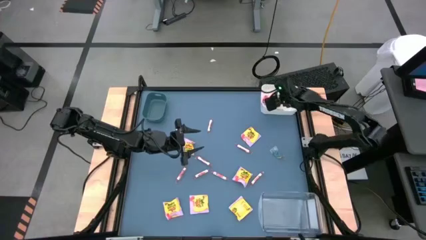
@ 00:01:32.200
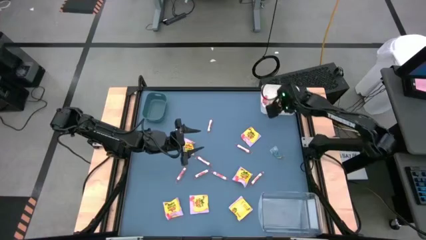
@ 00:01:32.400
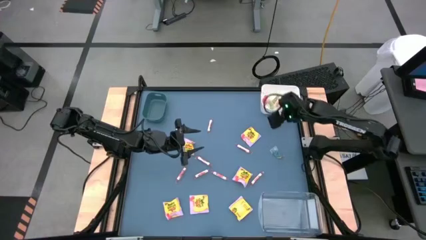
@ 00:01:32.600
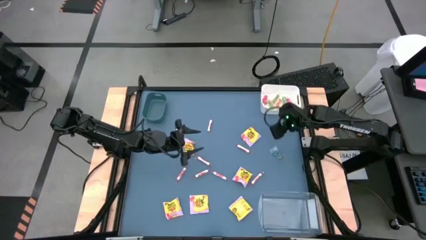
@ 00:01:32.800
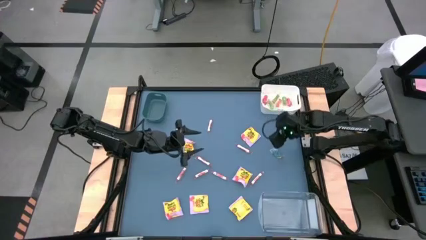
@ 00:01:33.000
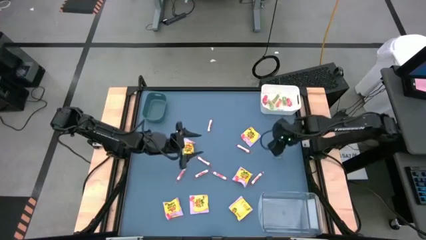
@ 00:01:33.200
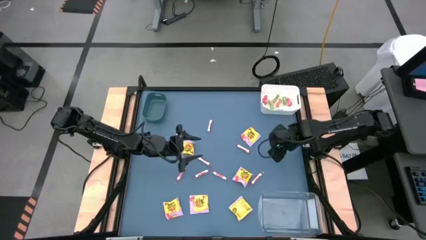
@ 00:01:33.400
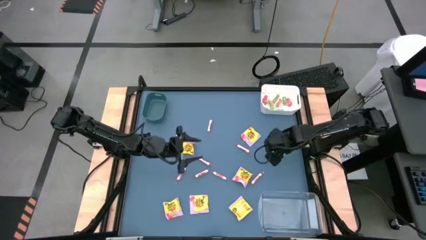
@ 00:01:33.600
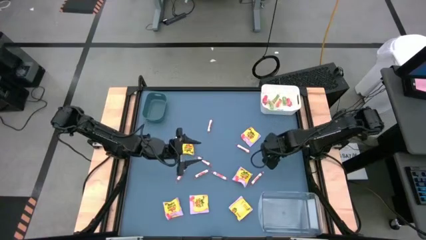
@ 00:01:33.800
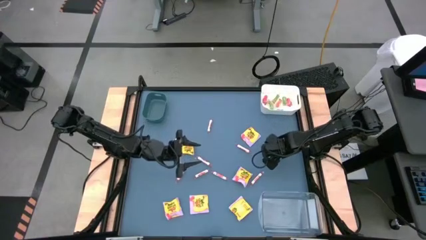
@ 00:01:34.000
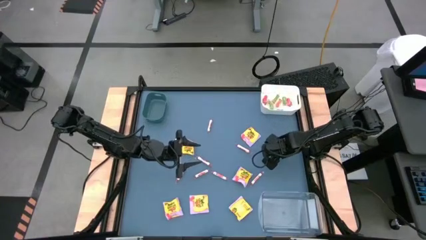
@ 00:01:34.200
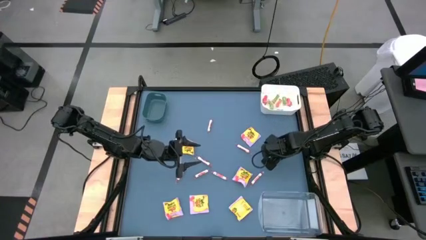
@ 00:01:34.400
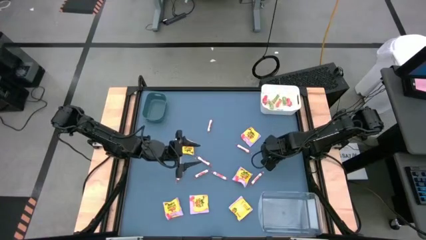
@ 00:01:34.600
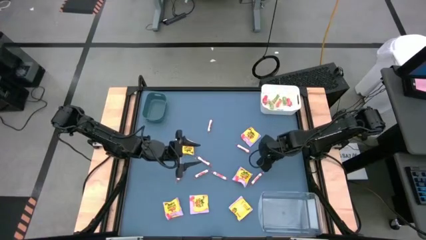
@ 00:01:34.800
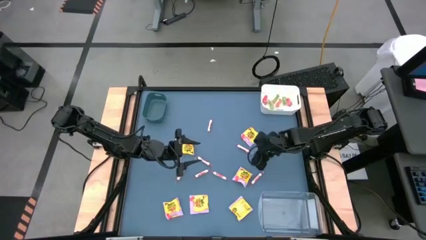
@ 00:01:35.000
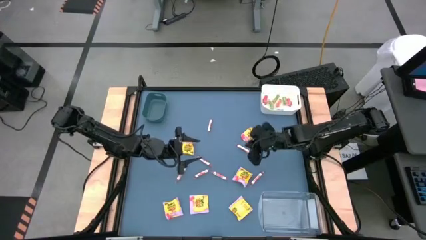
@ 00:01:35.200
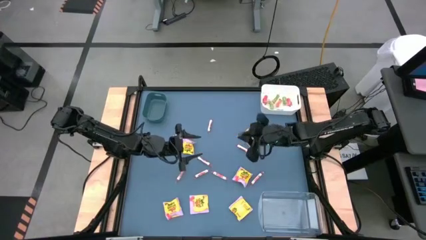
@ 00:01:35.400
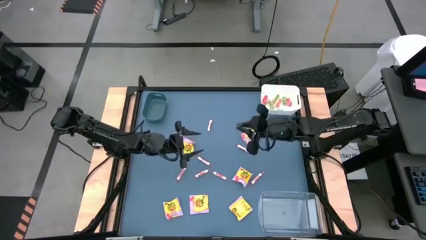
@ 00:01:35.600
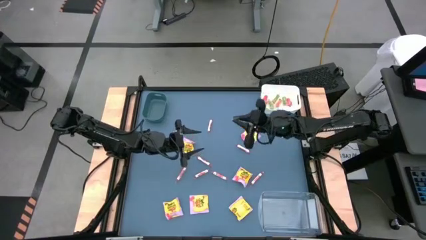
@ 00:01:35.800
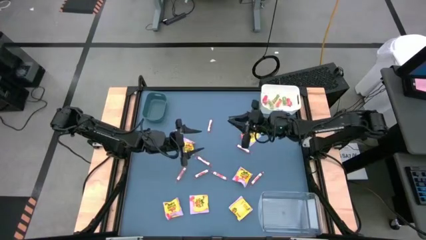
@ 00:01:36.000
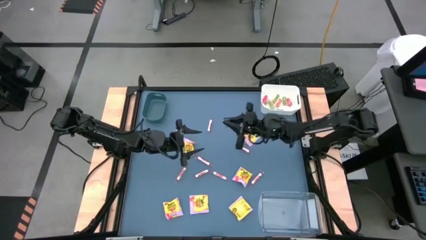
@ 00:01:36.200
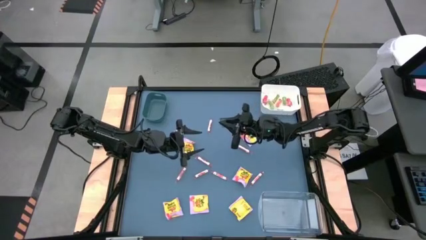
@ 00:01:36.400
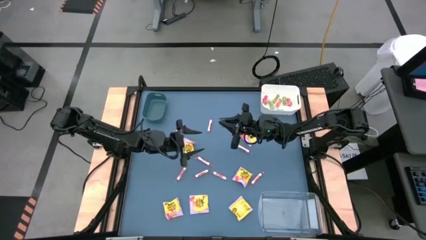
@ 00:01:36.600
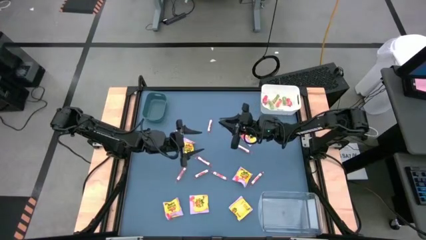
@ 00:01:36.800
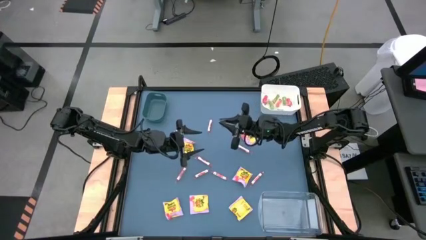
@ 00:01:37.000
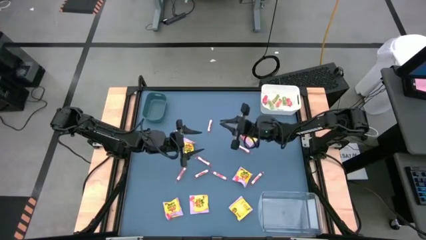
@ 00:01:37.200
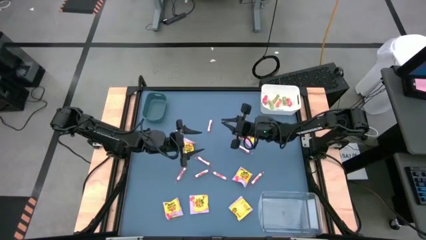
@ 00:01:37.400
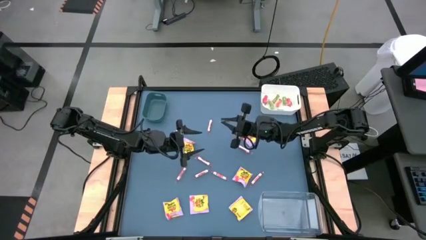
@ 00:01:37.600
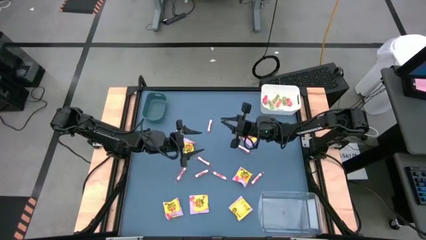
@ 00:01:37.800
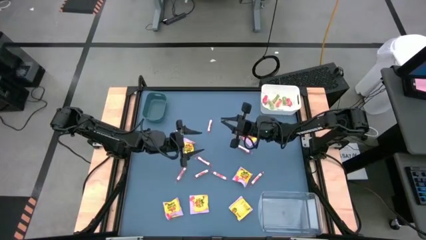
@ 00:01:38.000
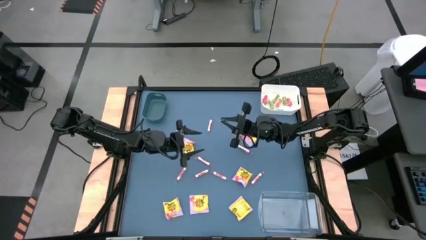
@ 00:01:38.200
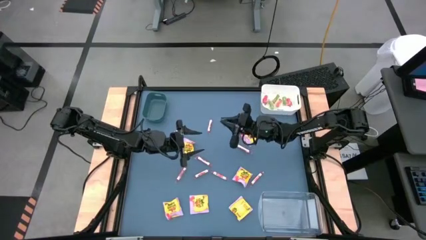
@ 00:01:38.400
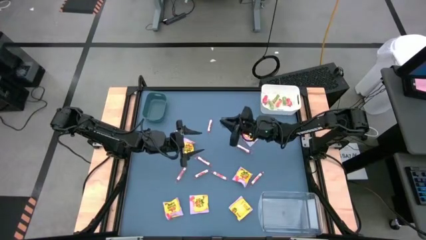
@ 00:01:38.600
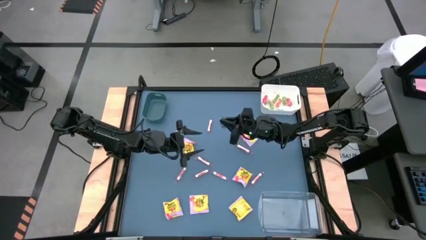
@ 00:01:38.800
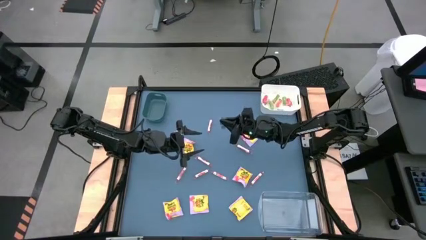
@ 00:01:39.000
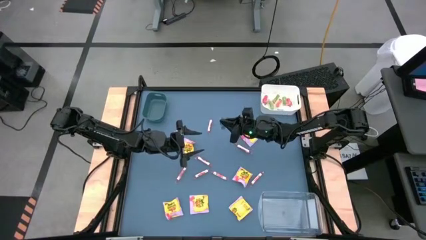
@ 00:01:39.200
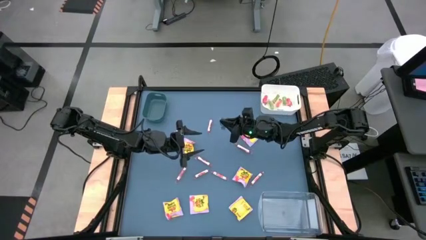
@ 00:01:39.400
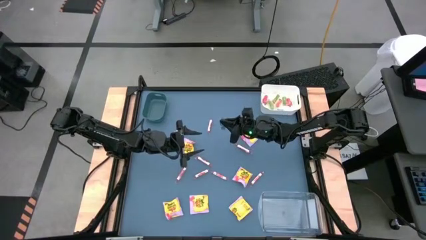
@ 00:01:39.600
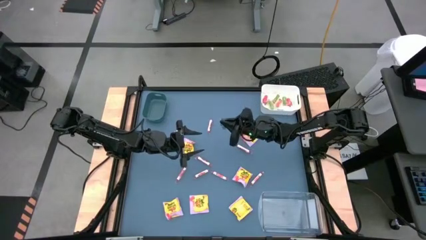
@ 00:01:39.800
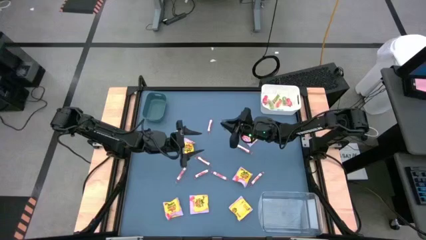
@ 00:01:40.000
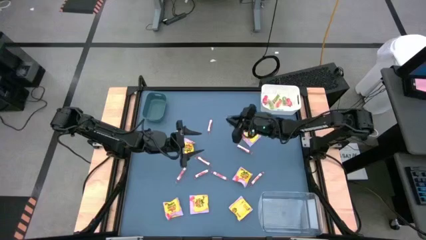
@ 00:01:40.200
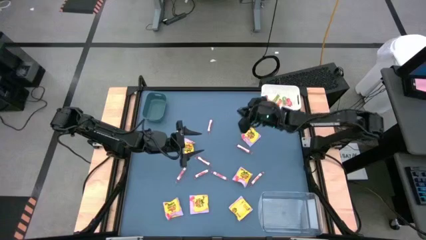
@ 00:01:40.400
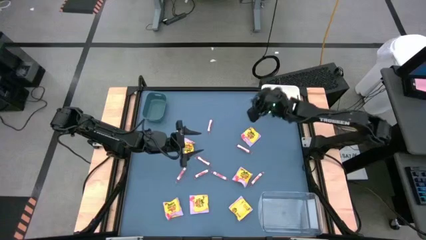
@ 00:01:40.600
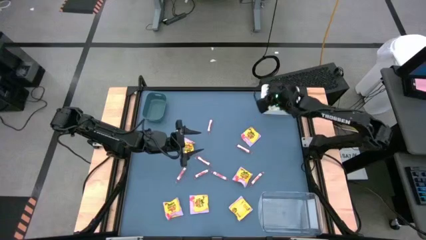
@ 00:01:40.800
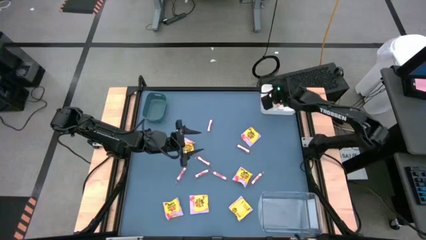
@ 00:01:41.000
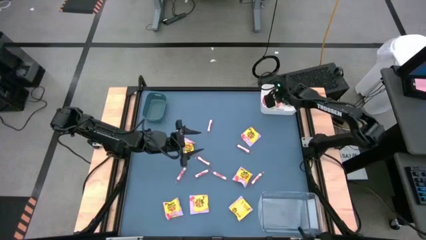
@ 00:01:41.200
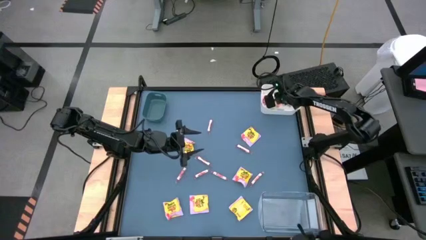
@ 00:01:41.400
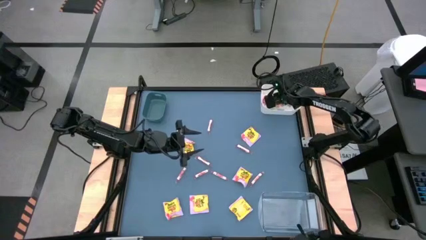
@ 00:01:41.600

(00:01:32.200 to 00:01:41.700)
Task: Sort candy
Put the blue gummy into the white bin

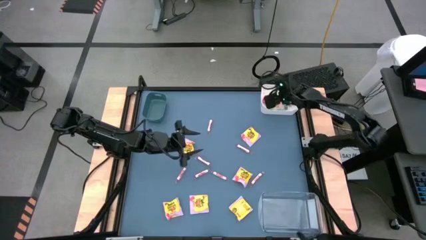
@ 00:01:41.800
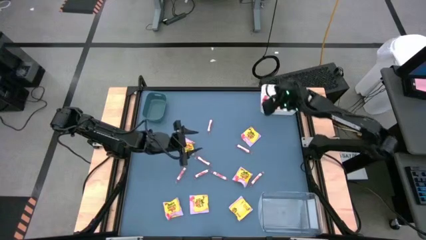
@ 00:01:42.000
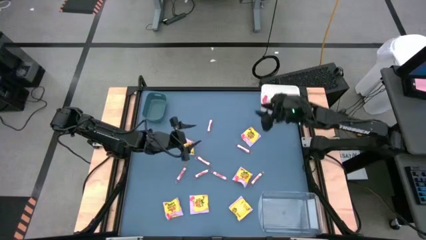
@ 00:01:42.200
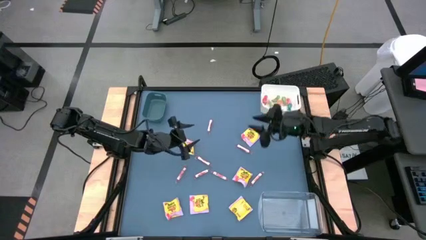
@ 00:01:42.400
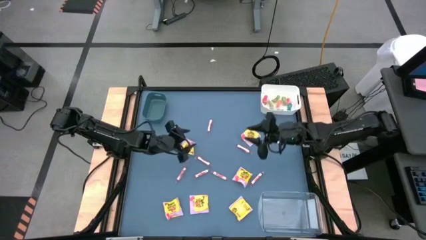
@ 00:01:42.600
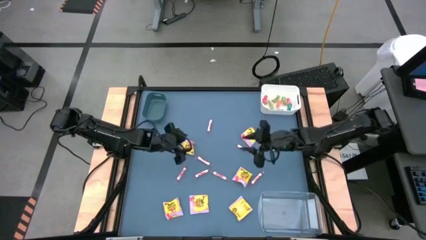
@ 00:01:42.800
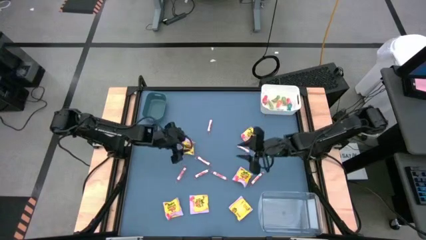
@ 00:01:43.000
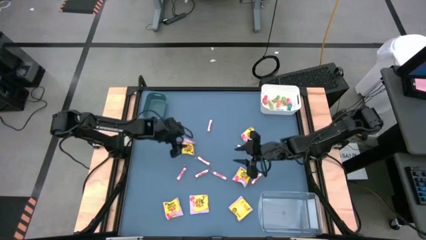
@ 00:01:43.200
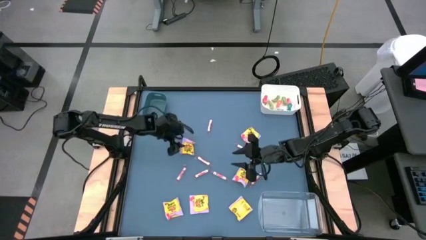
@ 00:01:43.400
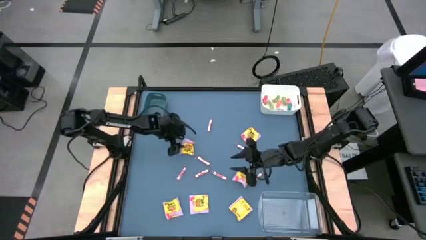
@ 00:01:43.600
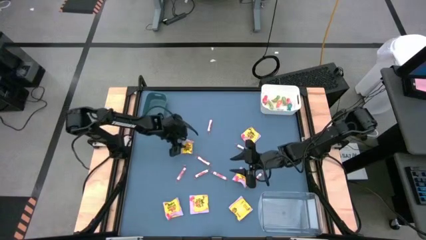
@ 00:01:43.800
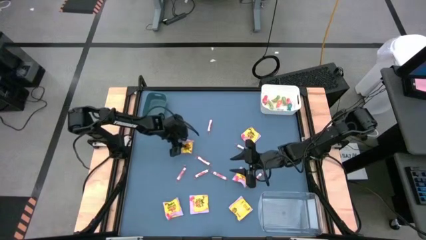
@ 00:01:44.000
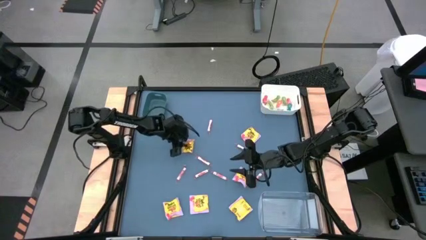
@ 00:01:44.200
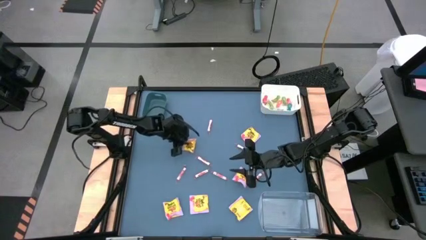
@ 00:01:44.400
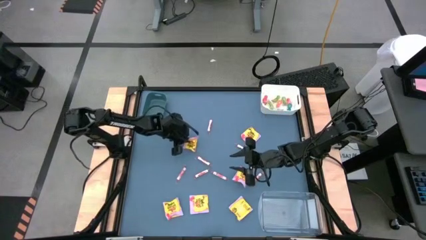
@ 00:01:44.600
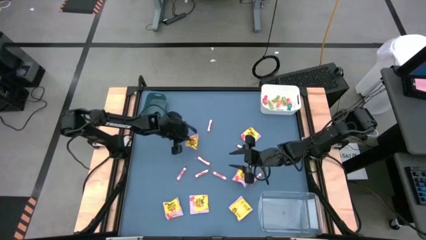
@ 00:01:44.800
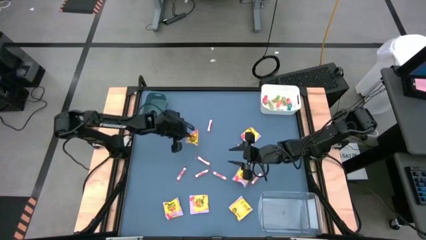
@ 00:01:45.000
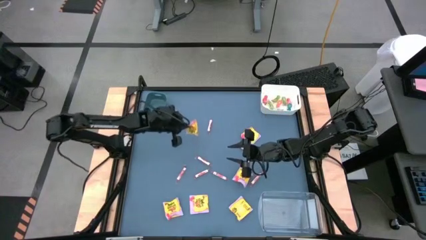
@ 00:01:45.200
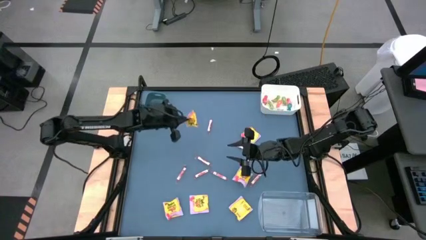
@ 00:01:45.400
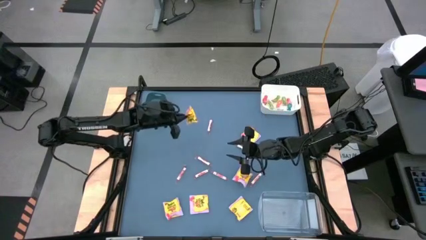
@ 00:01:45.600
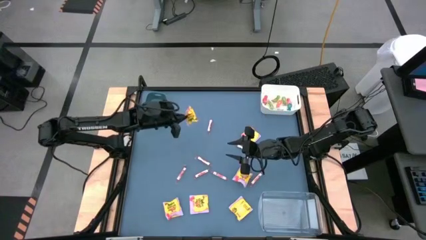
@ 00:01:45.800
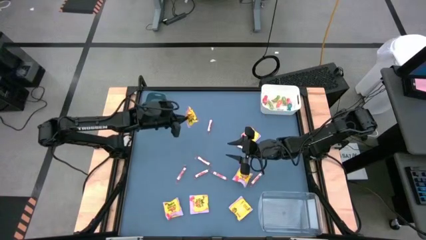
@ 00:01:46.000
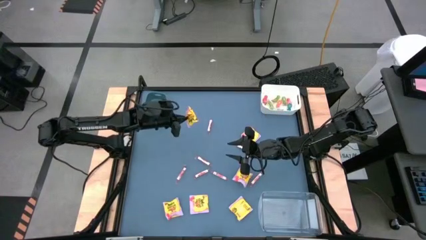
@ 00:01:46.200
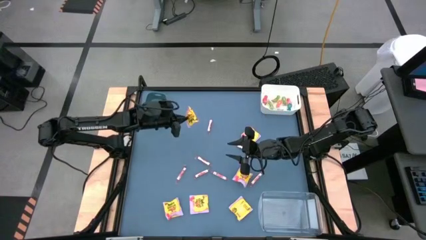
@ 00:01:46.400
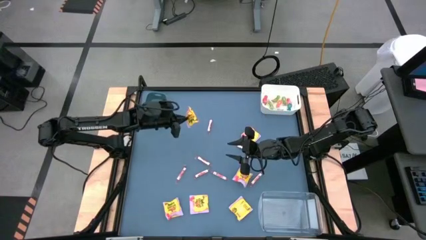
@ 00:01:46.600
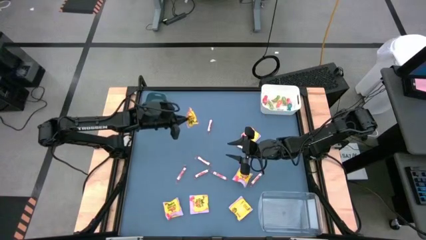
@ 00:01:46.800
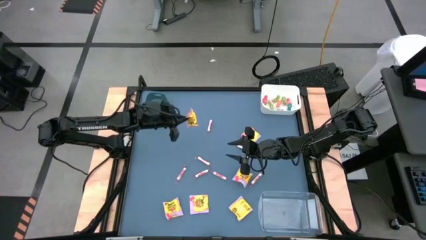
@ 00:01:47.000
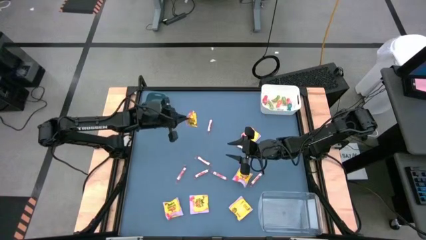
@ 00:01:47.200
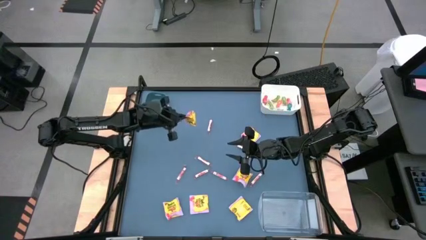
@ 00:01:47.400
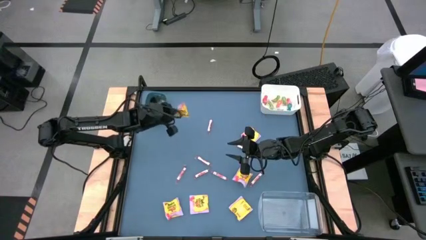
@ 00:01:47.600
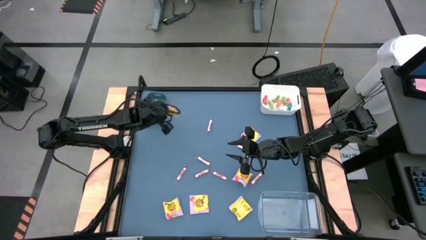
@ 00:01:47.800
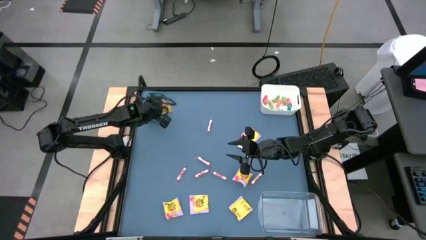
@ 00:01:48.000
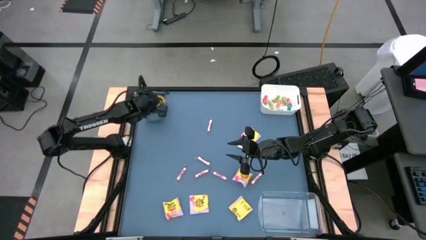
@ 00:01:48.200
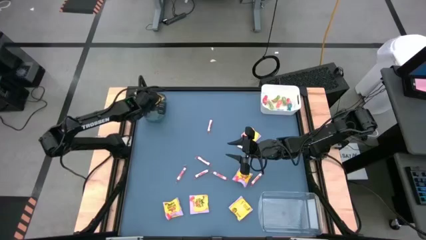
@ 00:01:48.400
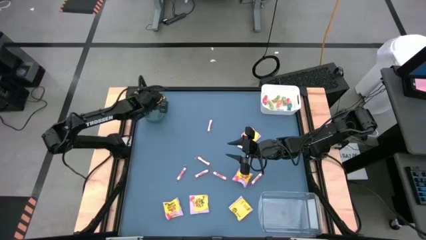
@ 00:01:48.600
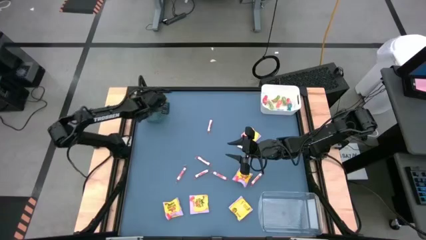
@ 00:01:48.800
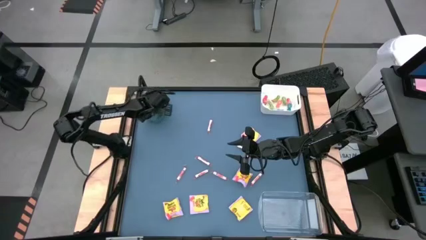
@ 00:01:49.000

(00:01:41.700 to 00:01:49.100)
Put the yellow candy pack into the blue bin
